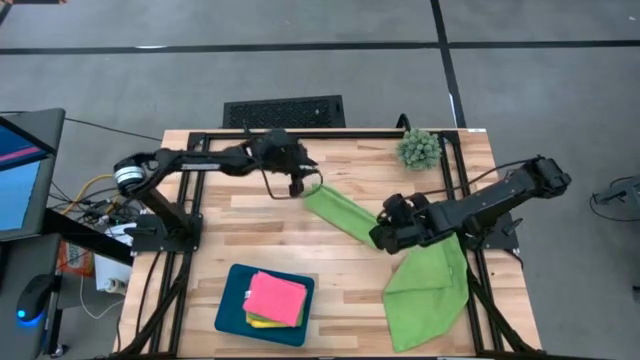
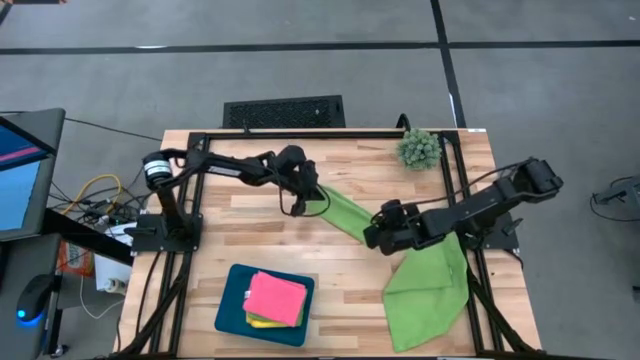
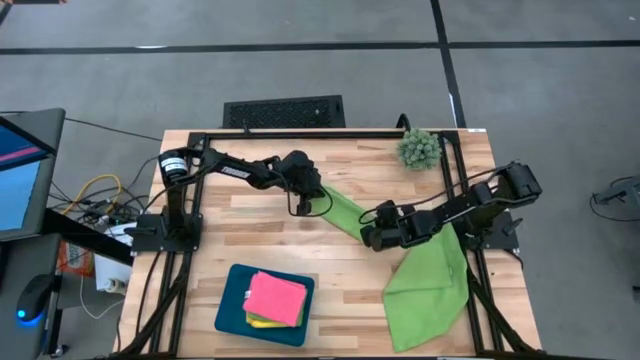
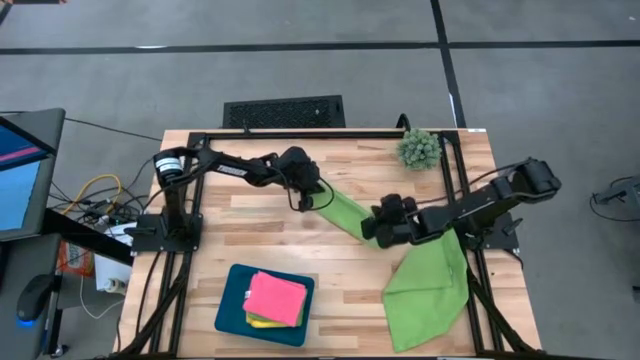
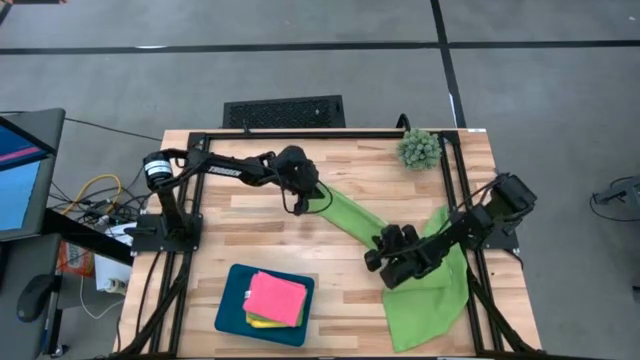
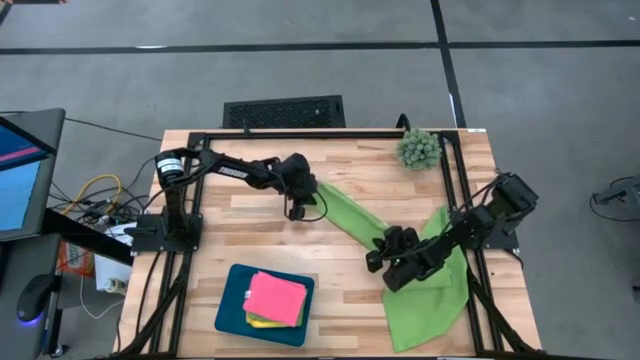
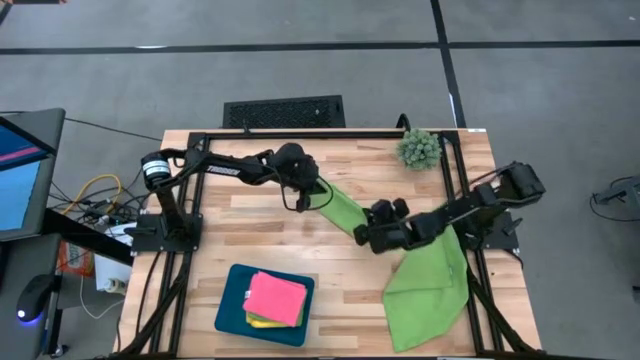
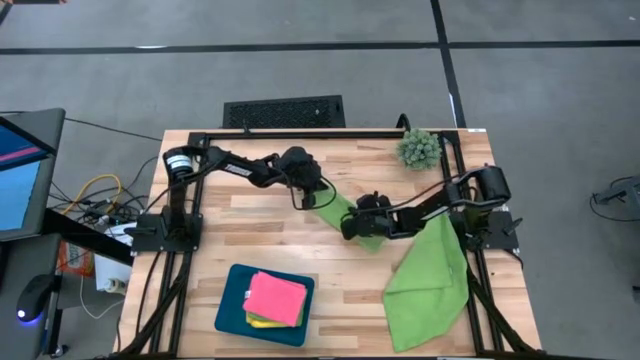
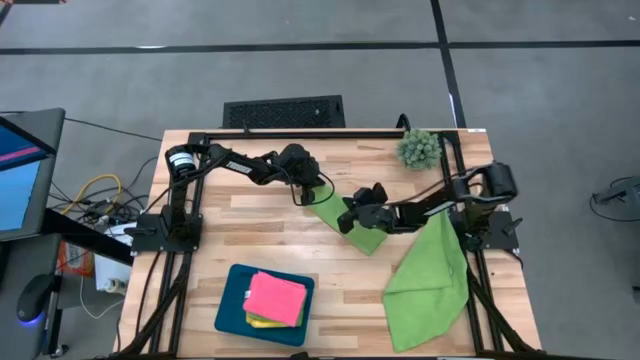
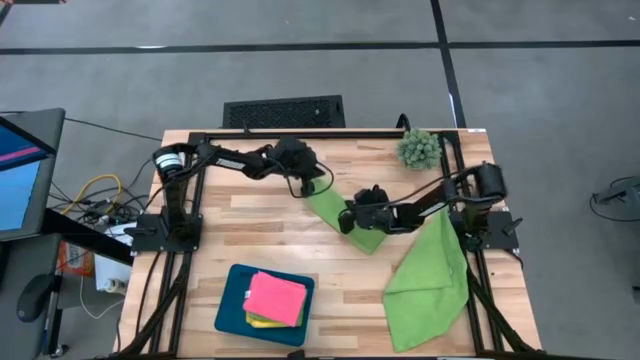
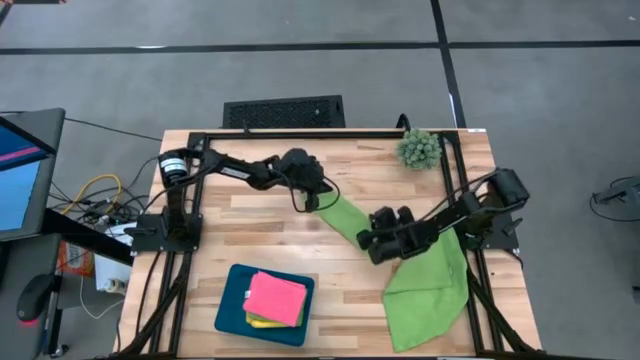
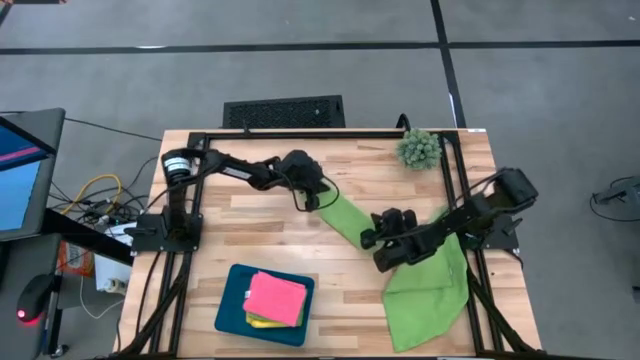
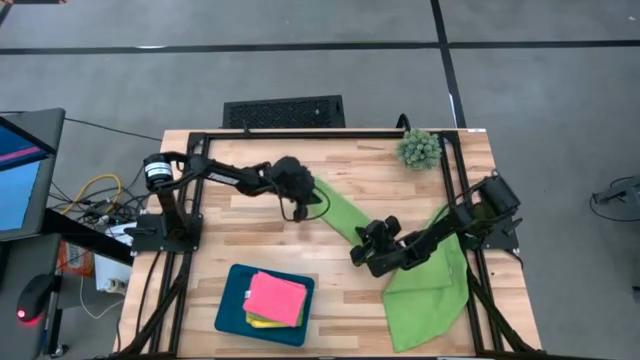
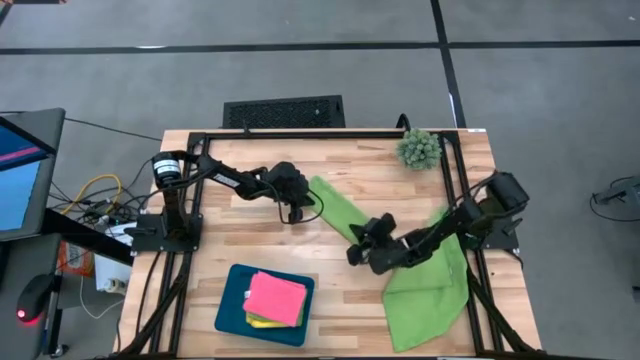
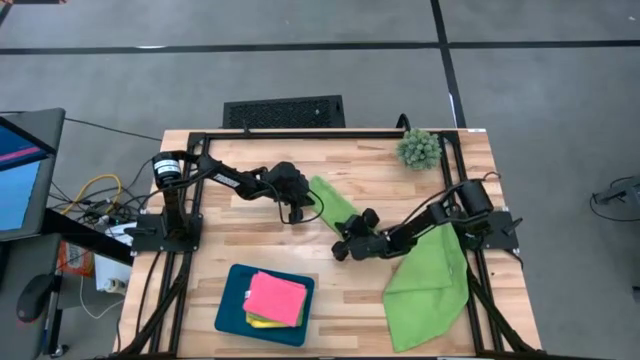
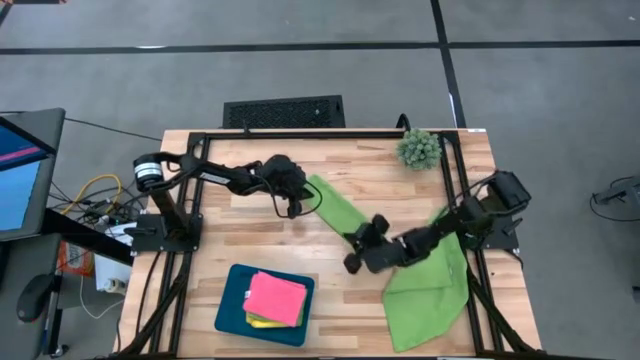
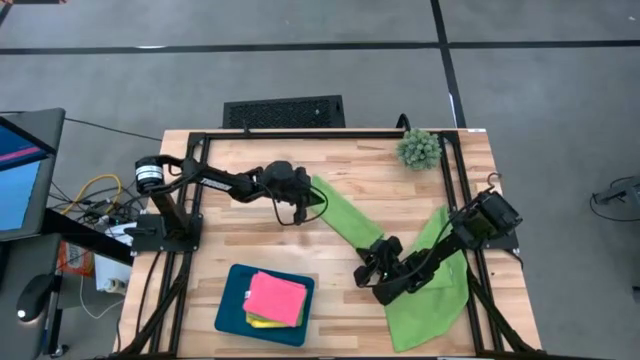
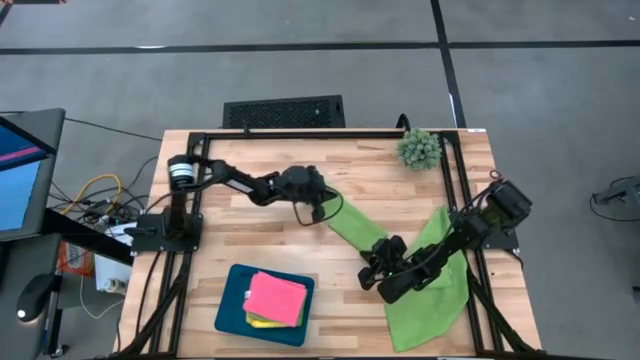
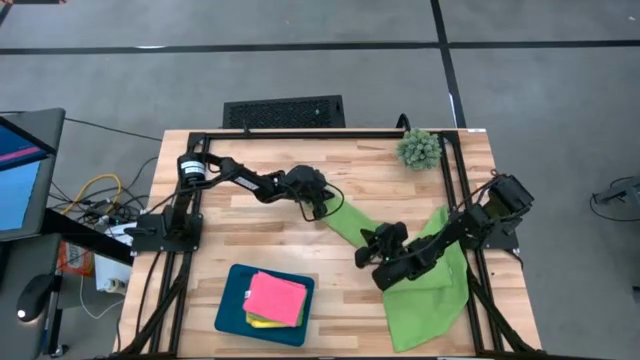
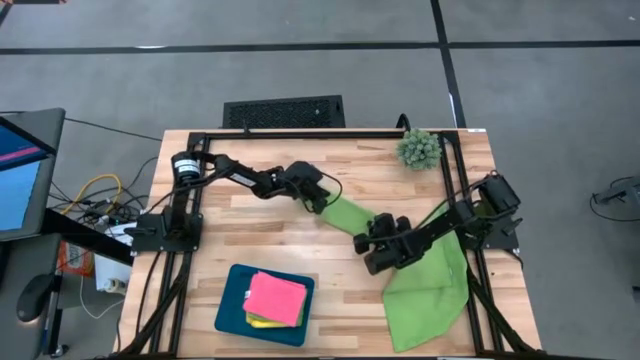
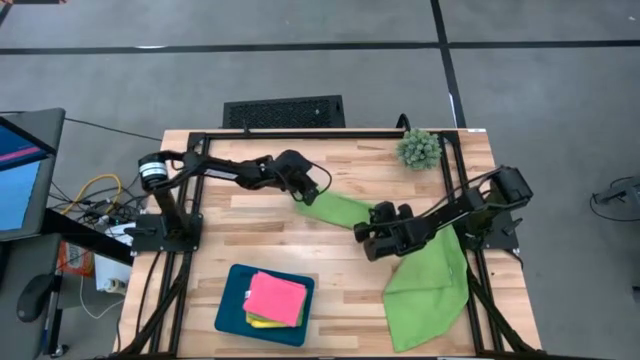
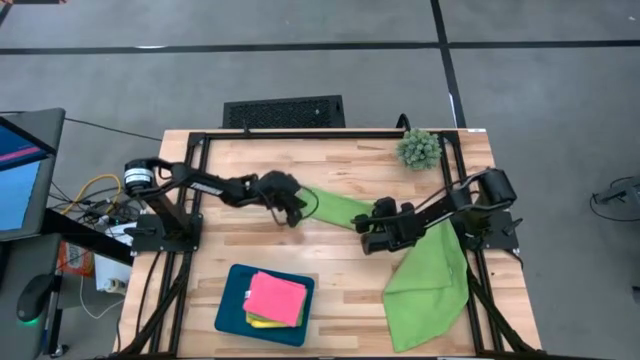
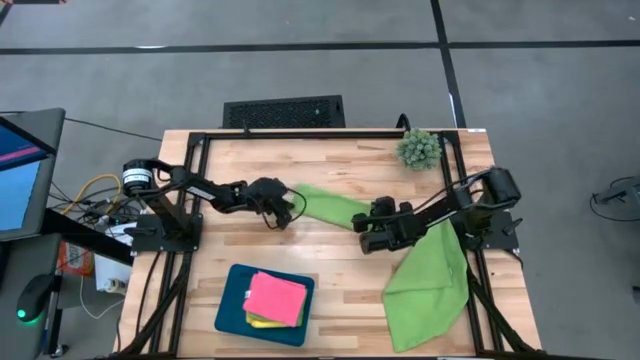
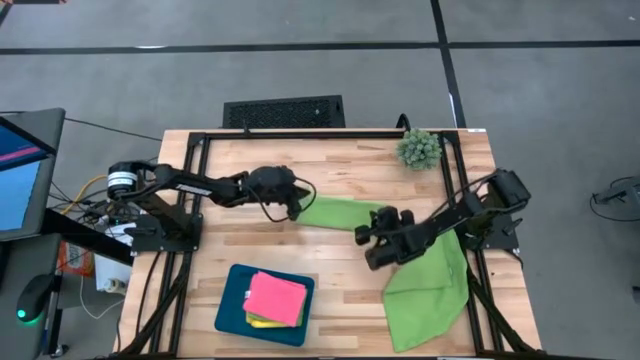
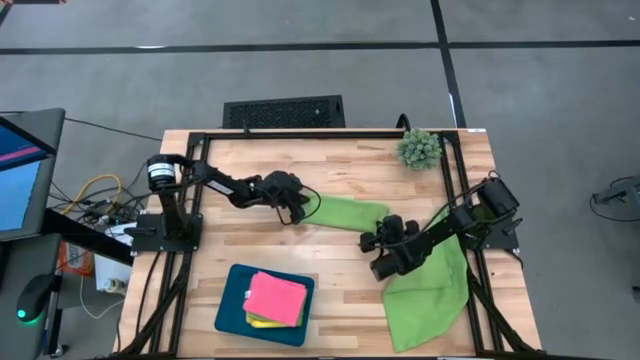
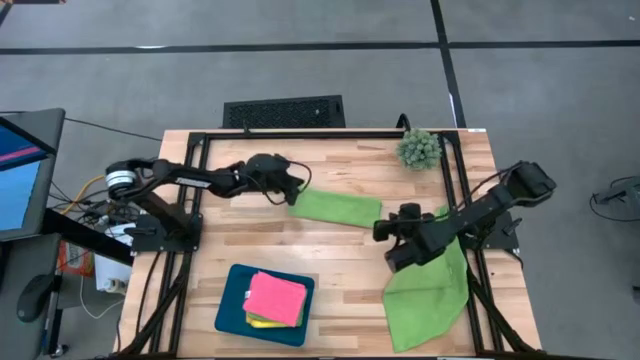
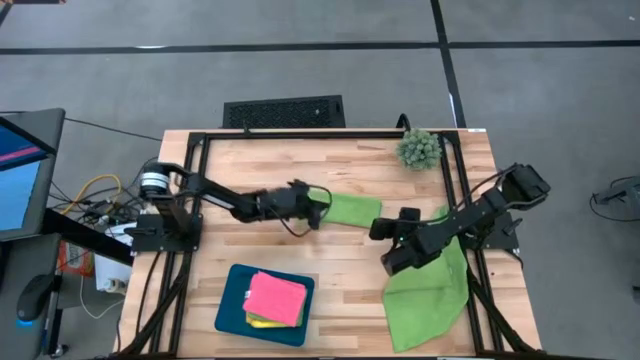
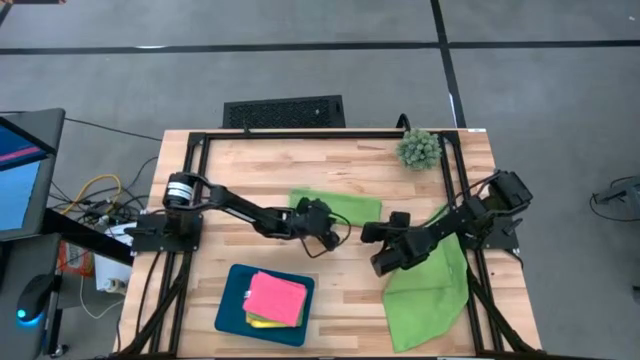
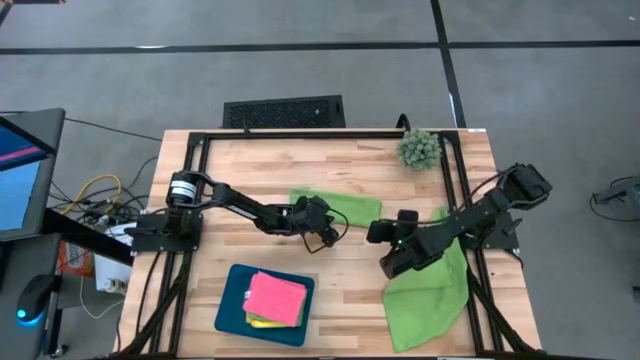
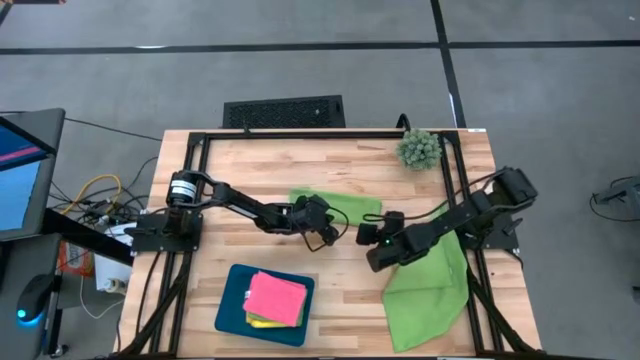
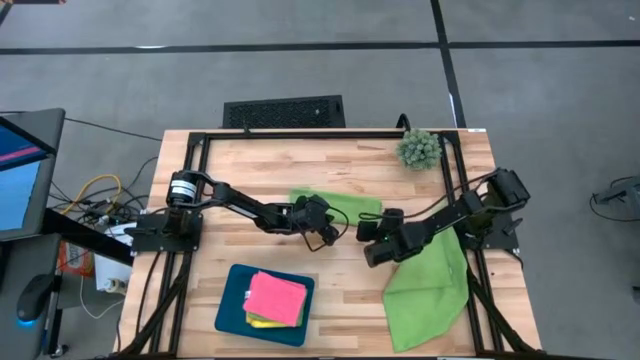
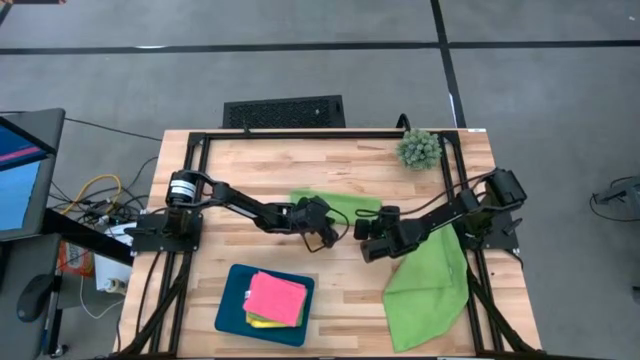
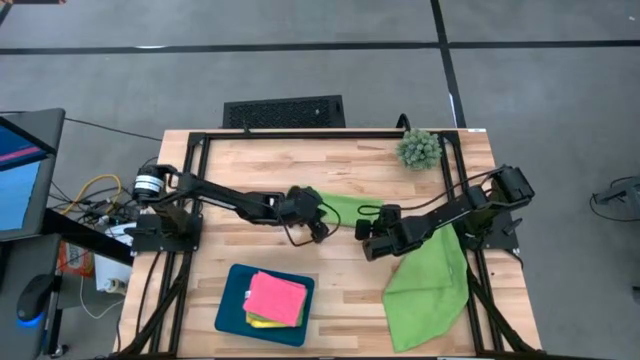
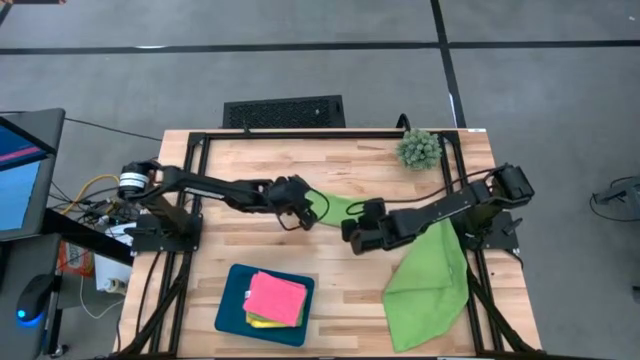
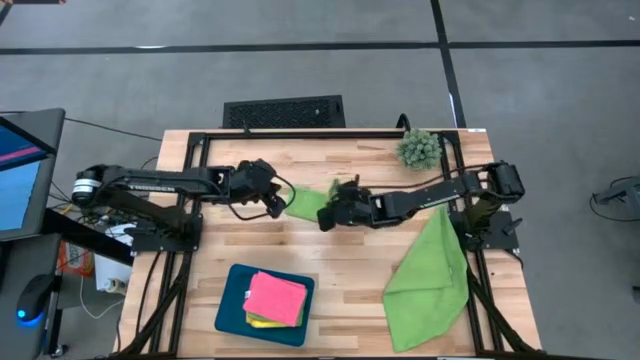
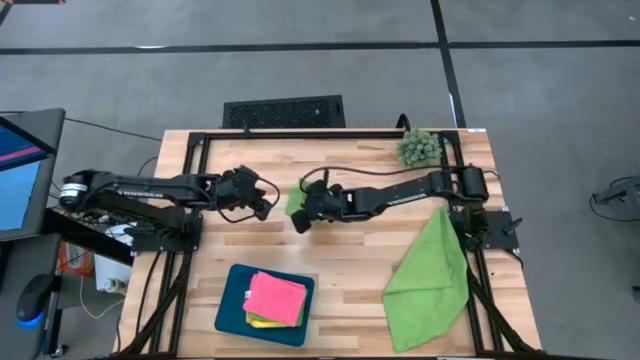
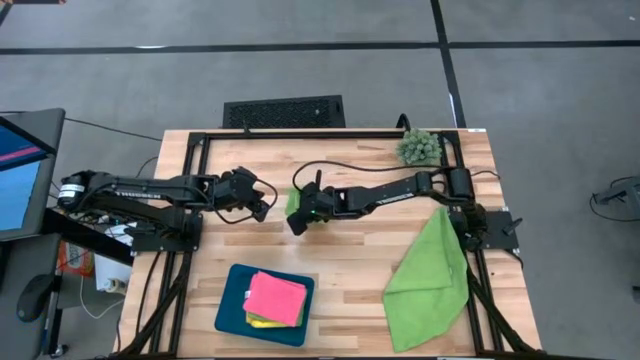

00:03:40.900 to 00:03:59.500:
Task: Fold microfiber towels
Fold the top green microfiber towel on the table

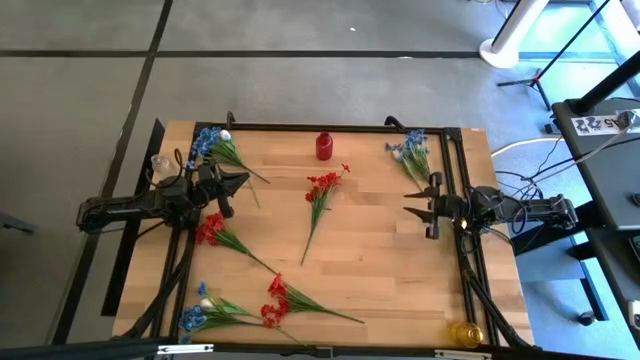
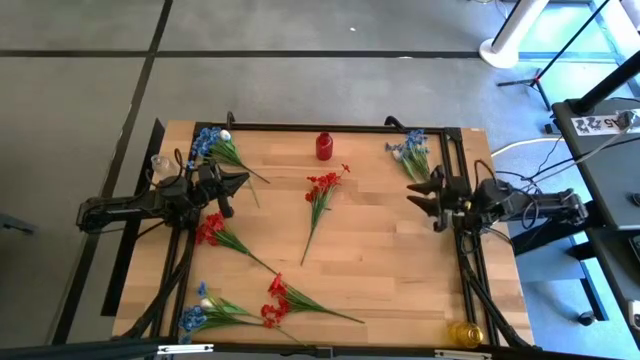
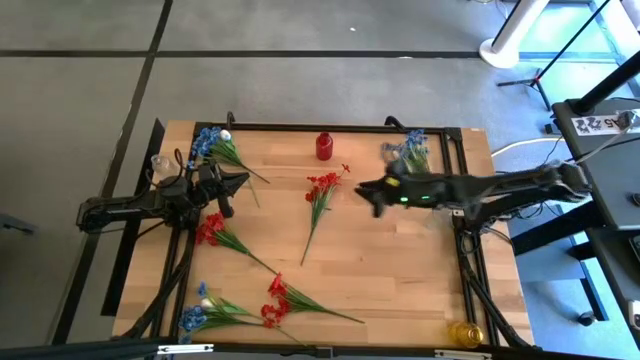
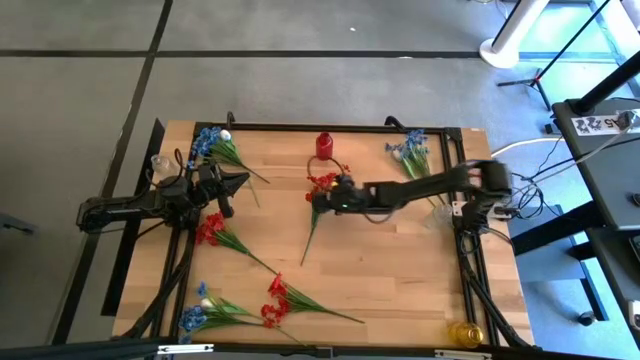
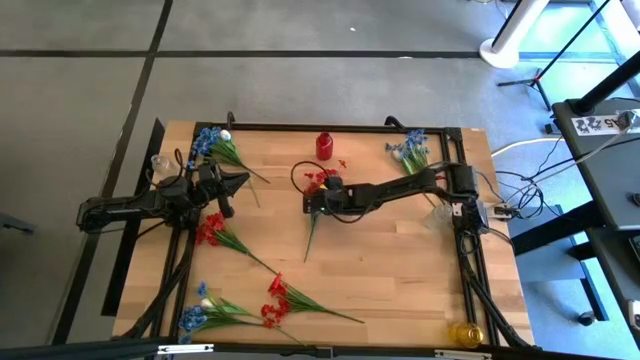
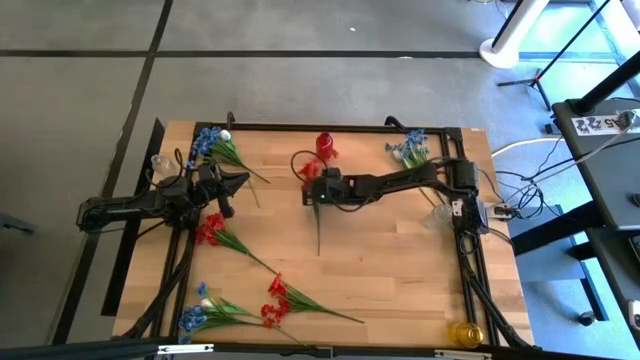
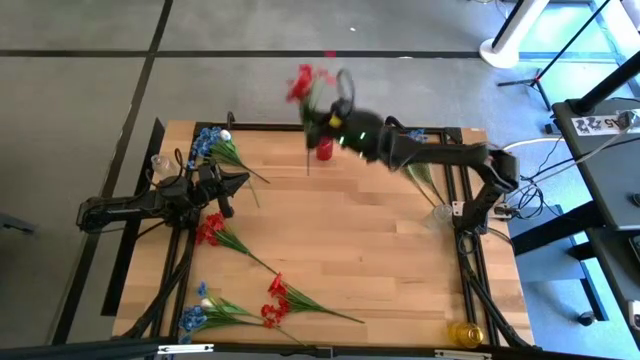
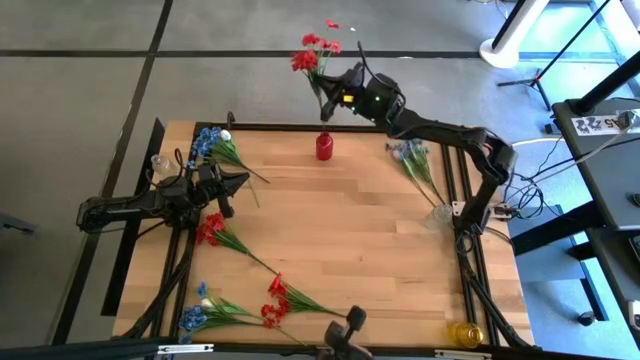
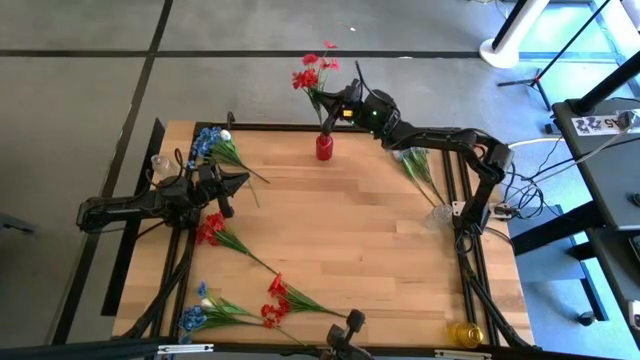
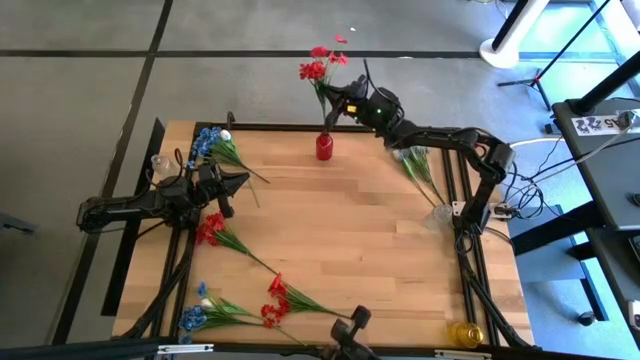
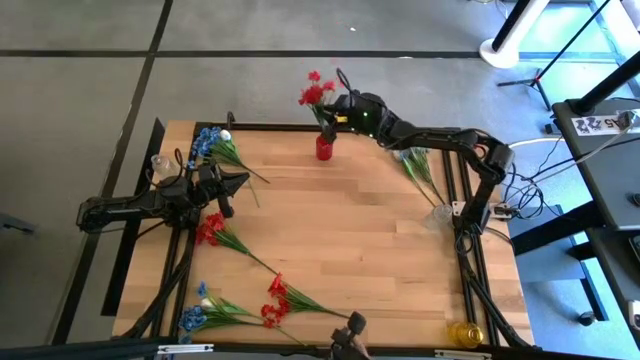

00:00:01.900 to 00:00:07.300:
Task: Sort flowers into vase by color
Put the top red flowers into the red vase
